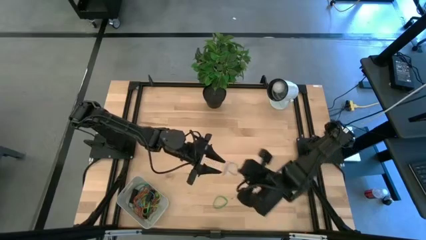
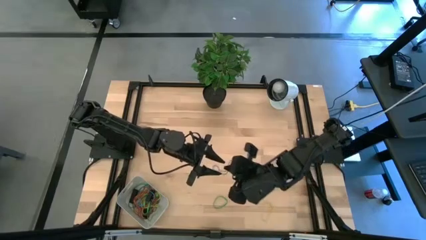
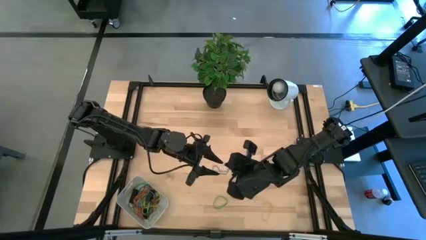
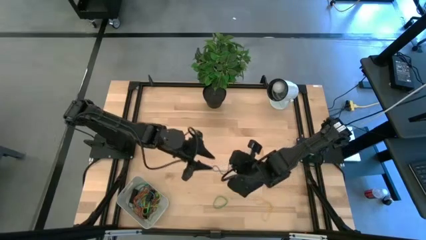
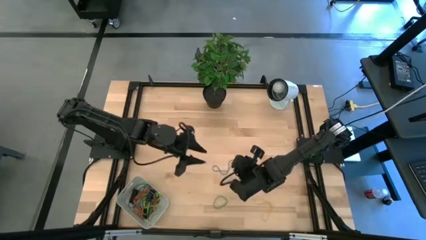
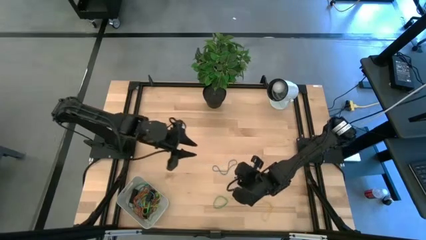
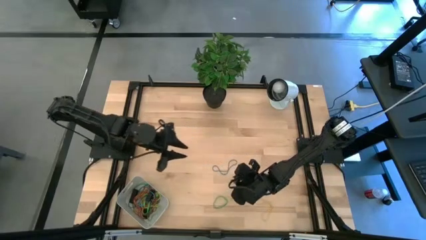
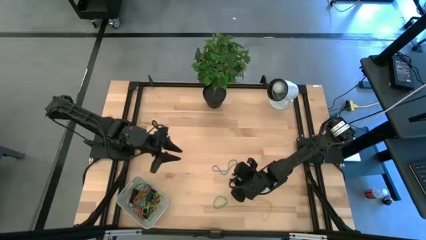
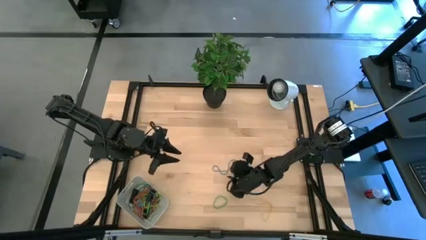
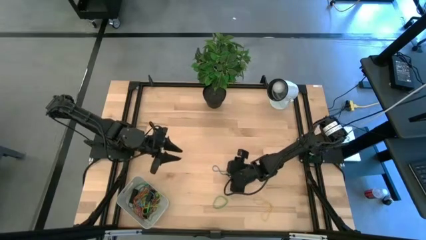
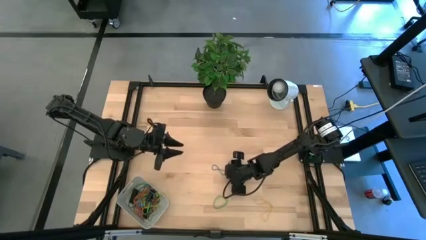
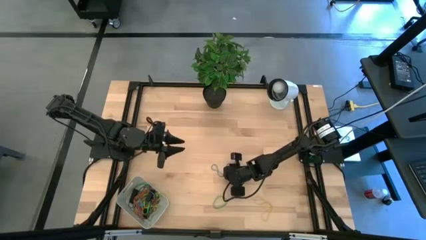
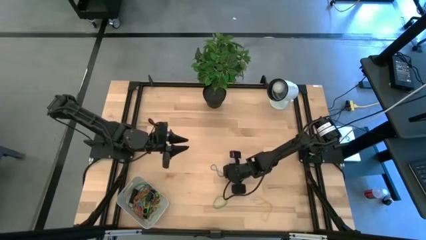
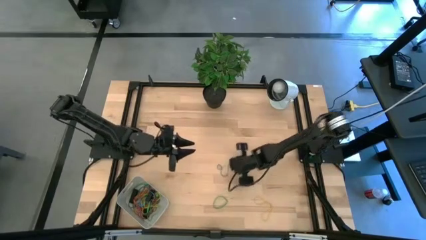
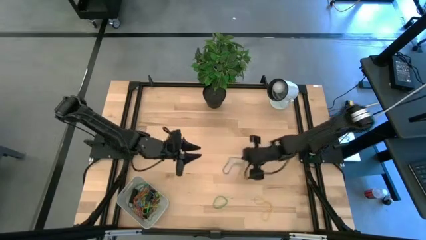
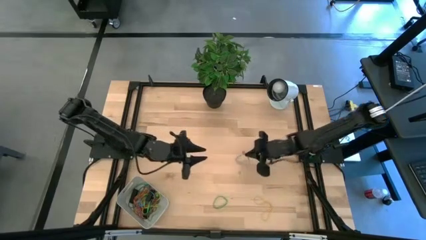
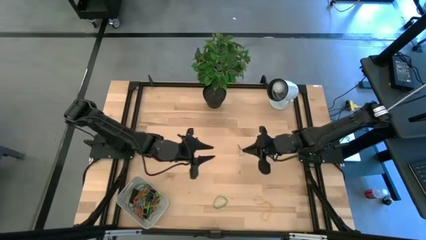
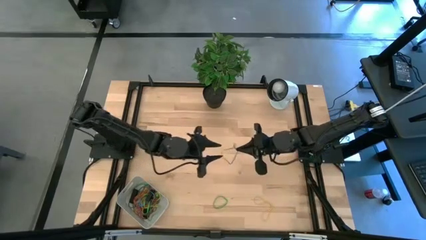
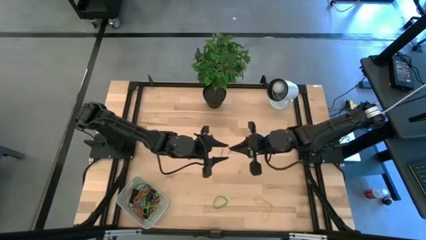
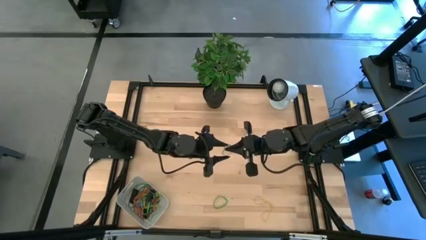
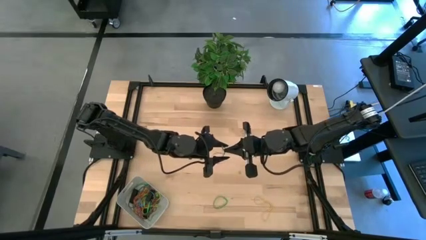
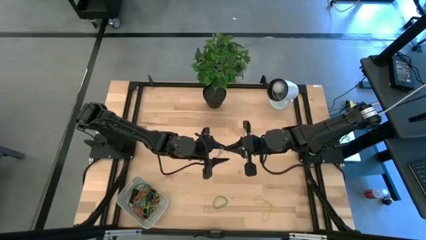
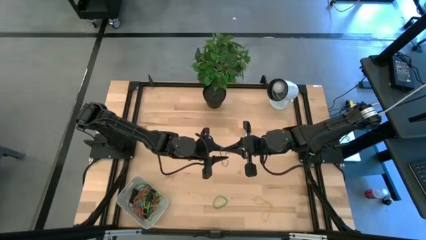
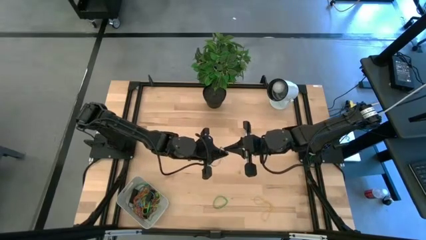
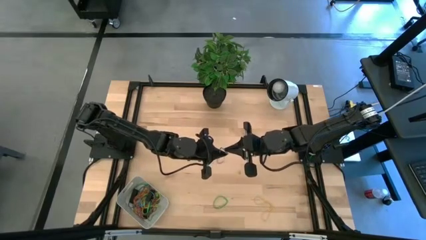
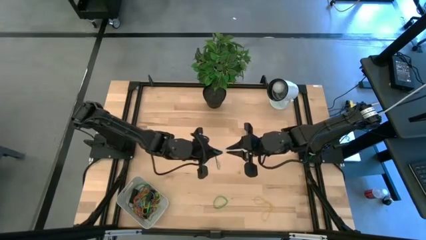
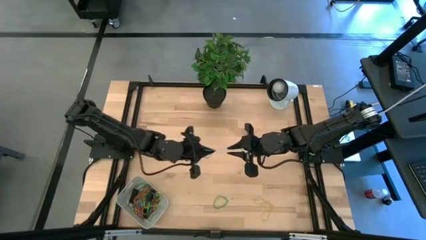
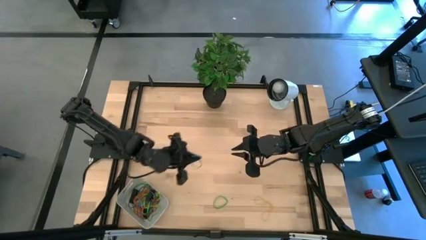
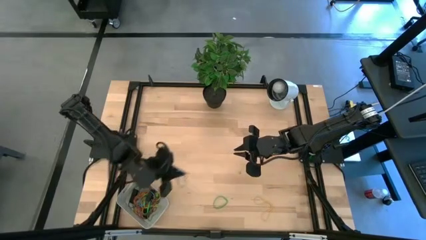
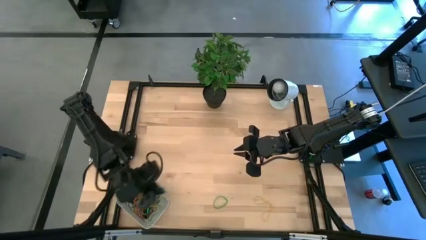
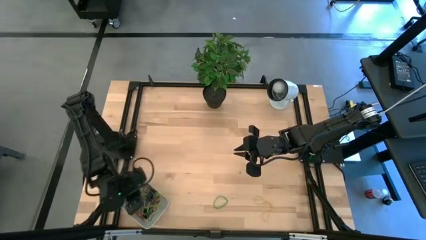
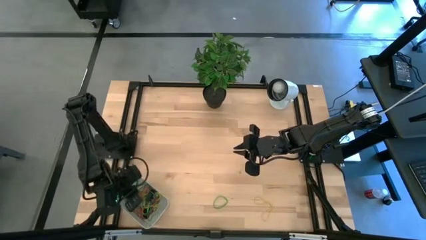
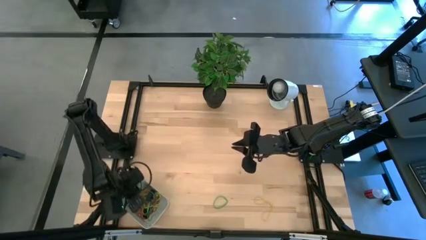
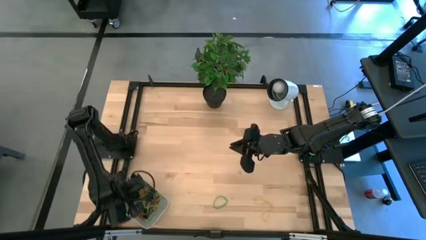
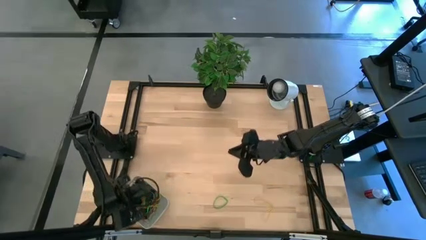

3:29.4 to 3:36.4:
Task: Pick and place rubber bands into bin
Put the blue rubber band into the gray bin

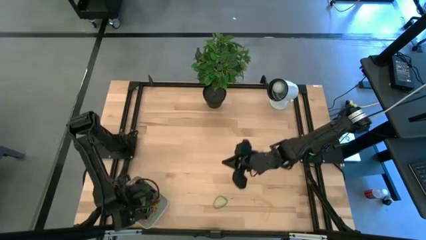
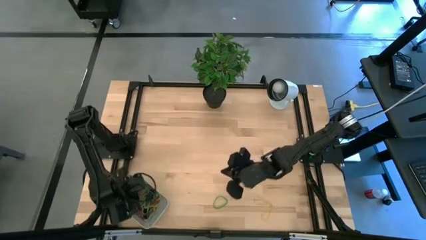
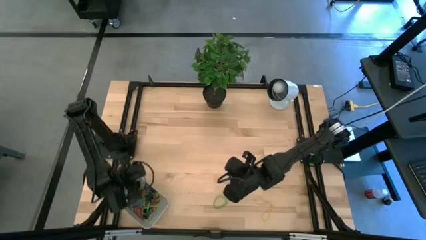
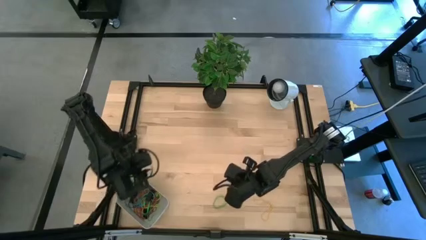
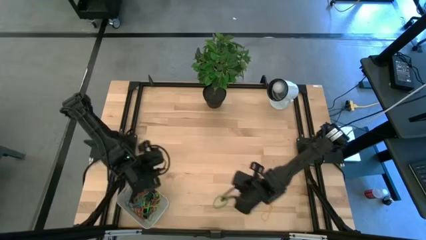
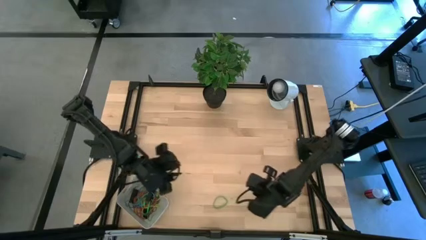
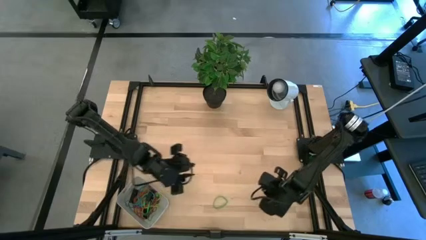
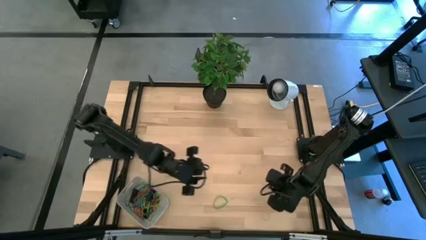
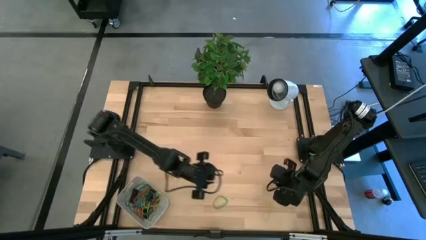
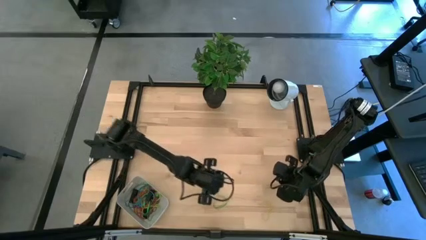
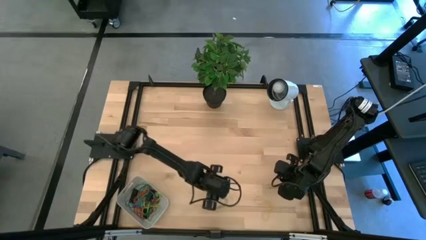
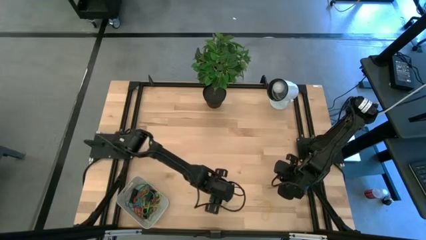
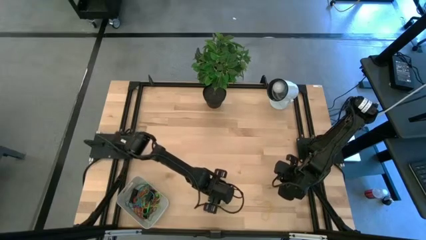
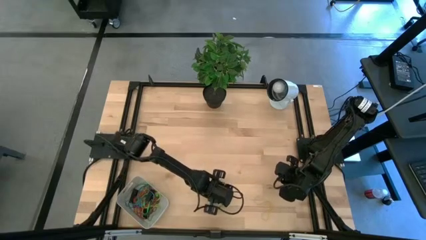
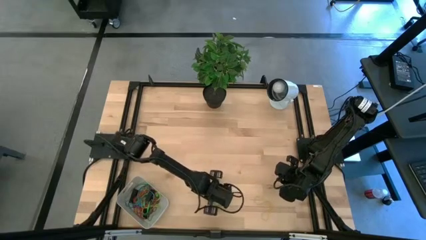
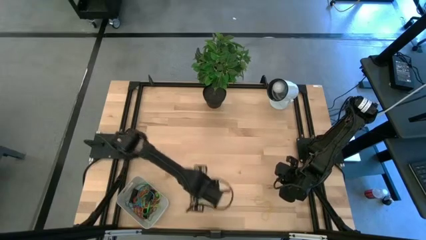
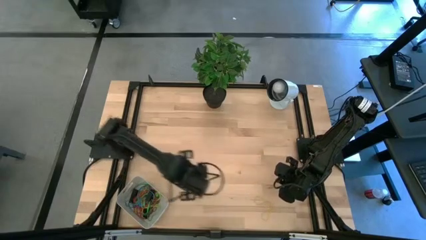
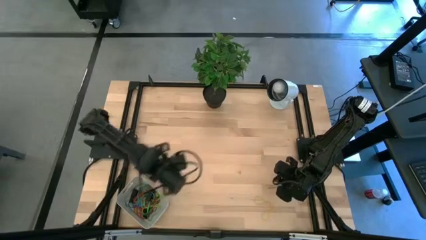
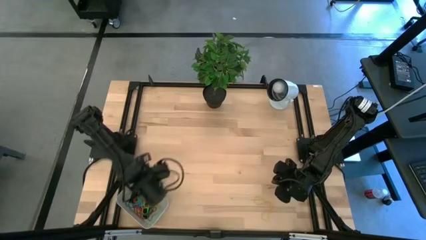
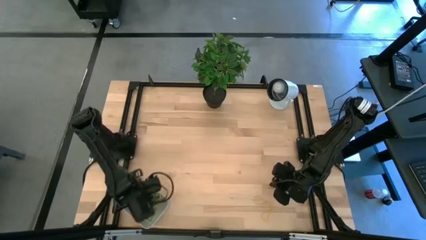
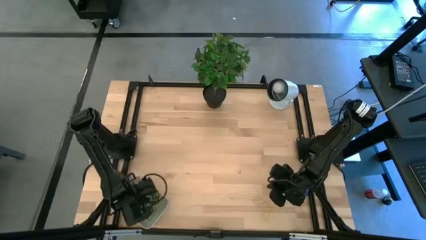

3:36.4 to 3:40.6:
Put the green rubber band into the gray bin

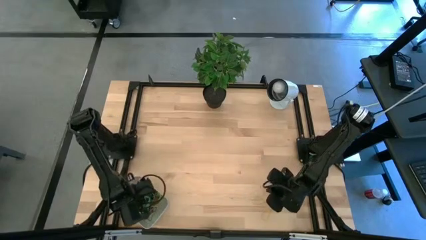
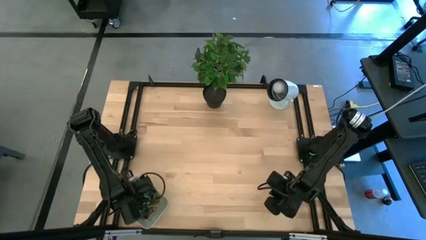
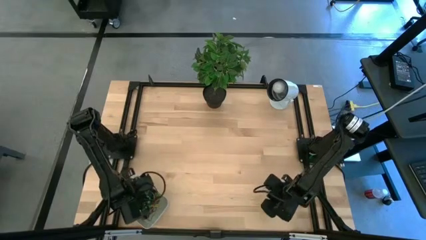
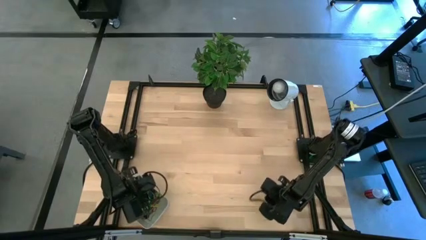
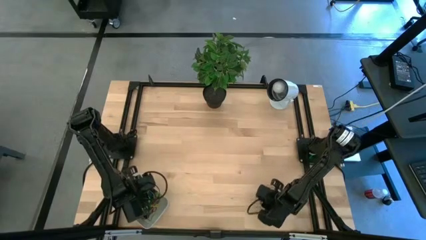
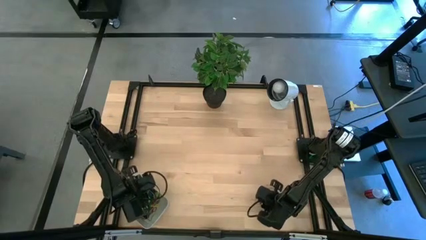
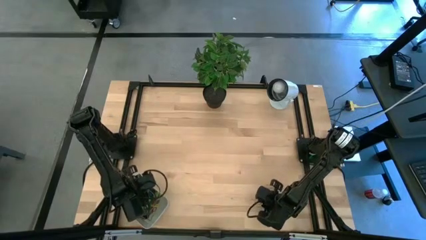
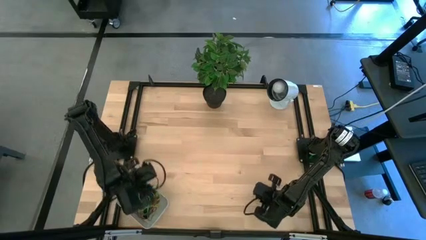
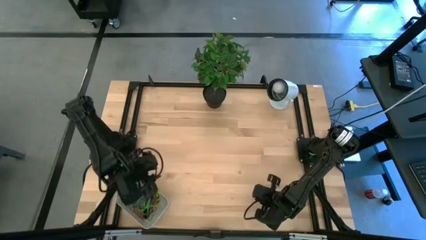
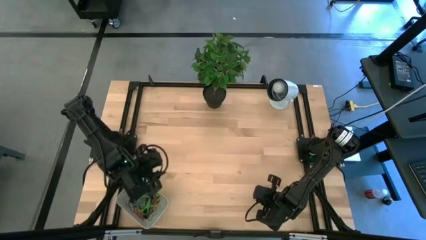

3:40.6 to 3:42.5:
Put the yellow rubber band into the gray bin

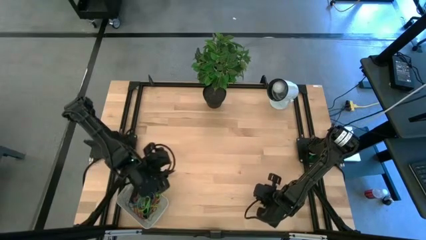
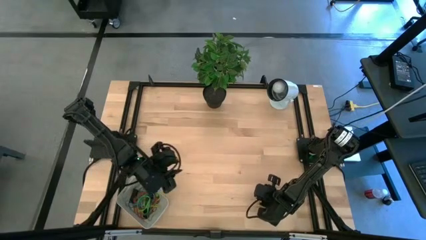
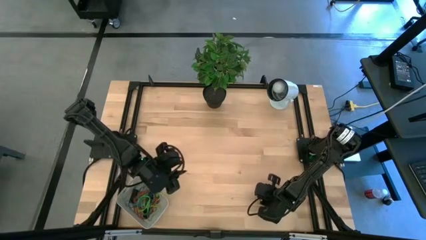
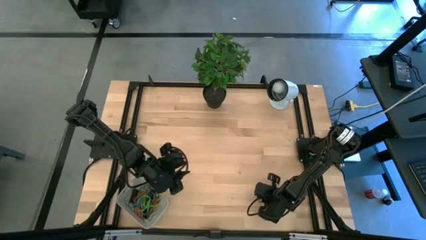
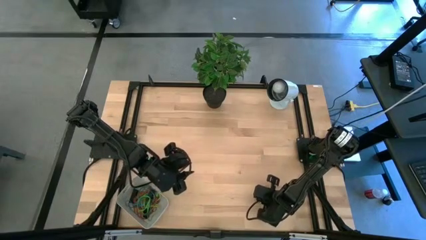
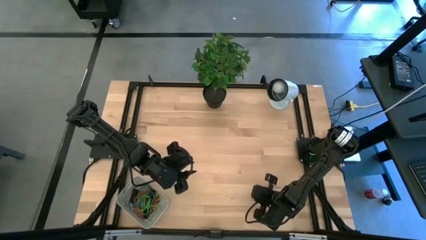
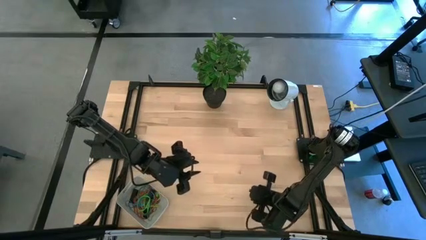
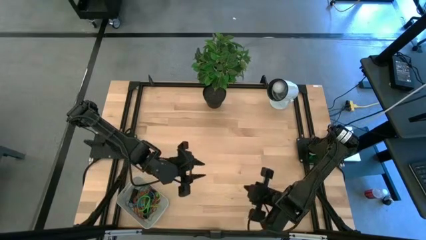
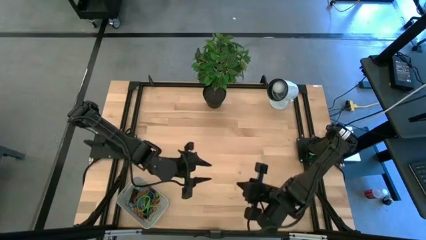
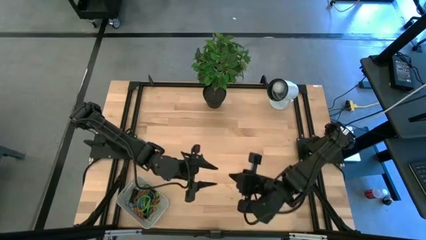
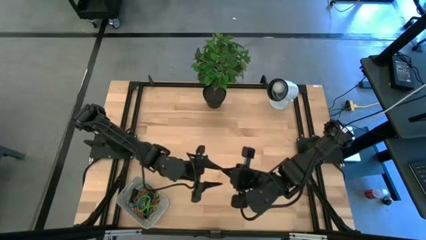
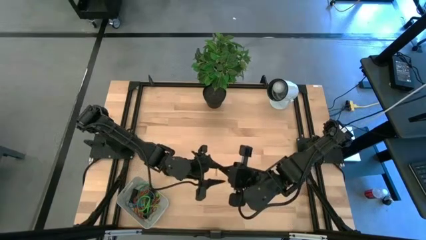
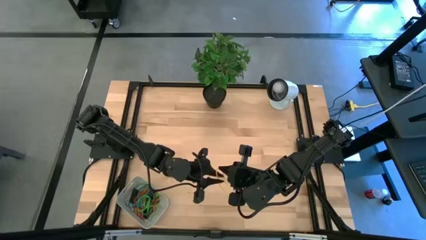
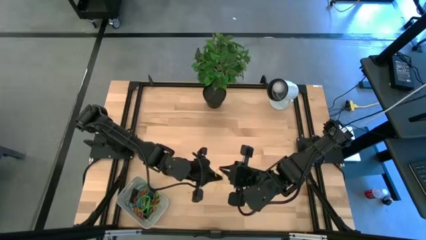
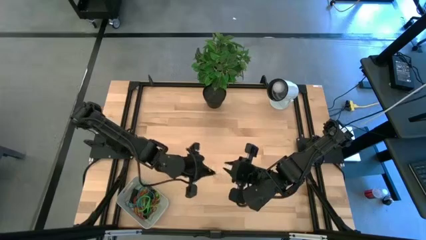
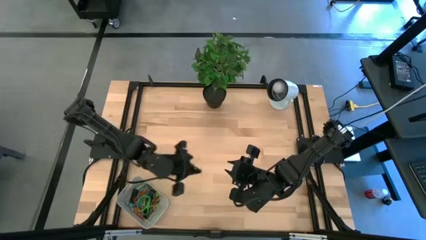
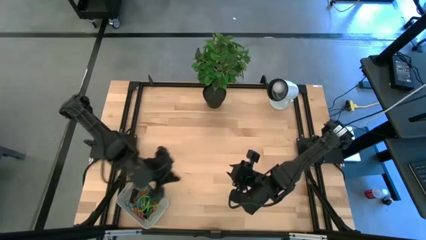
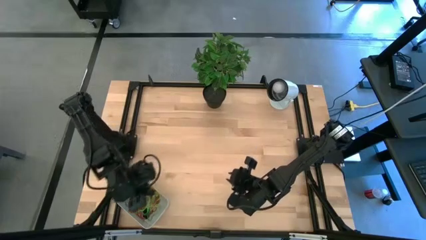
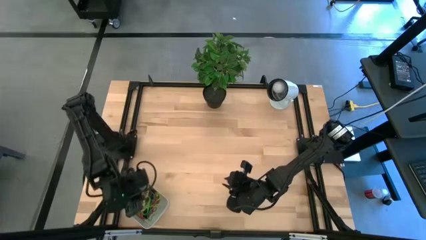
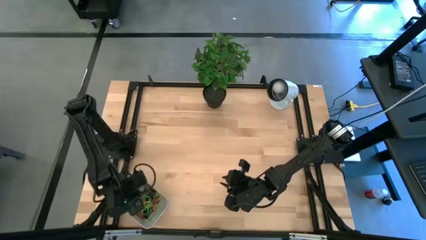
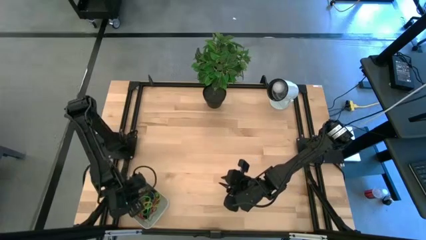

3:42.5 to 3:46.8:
Put the yellow rubber band into the gray bin
